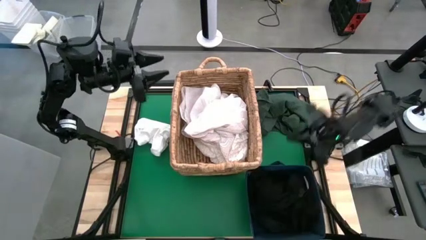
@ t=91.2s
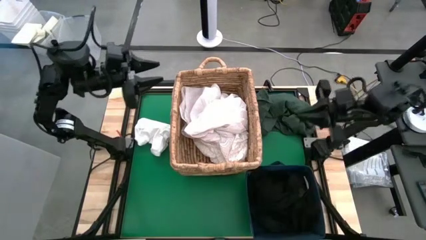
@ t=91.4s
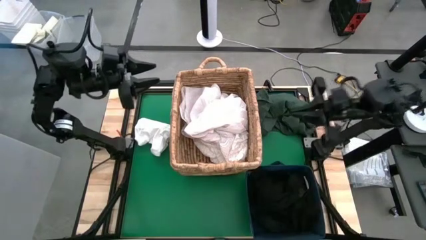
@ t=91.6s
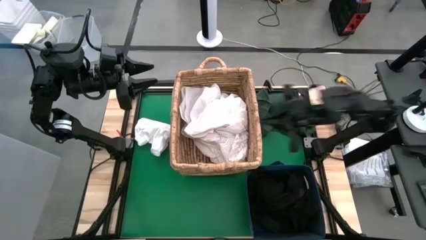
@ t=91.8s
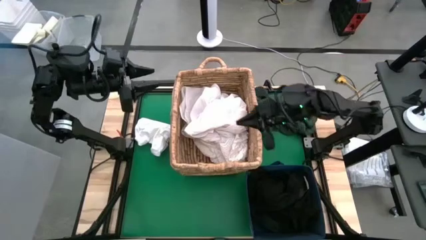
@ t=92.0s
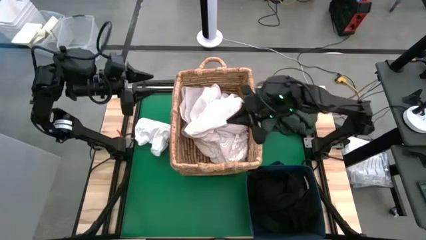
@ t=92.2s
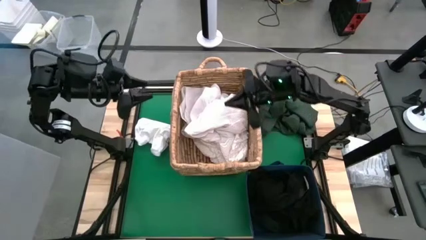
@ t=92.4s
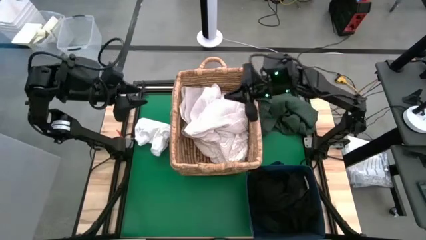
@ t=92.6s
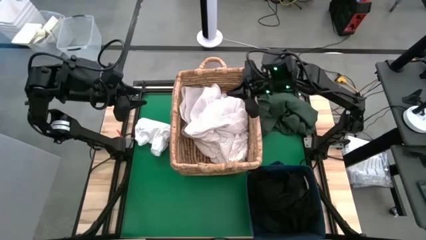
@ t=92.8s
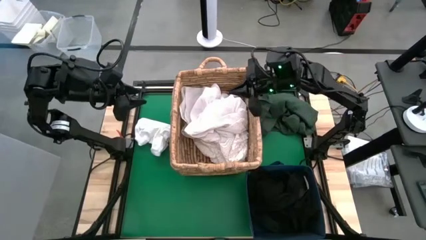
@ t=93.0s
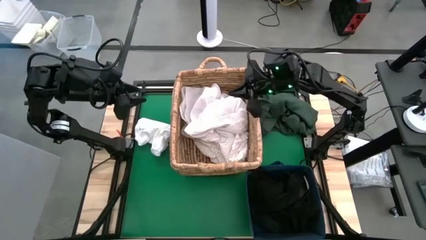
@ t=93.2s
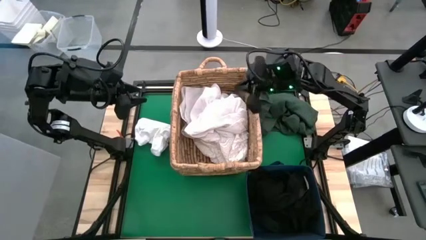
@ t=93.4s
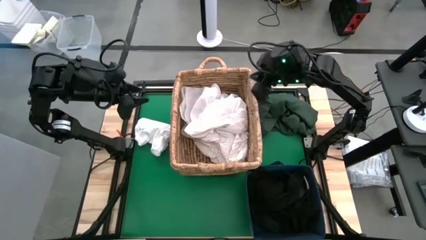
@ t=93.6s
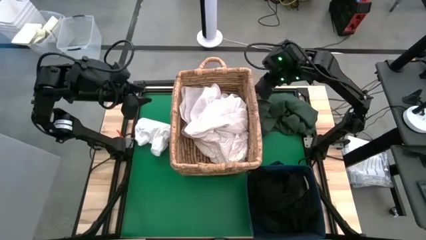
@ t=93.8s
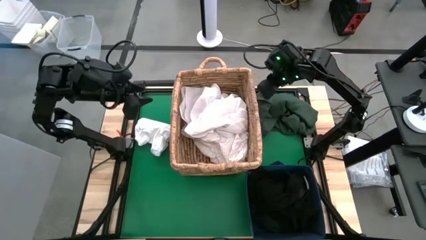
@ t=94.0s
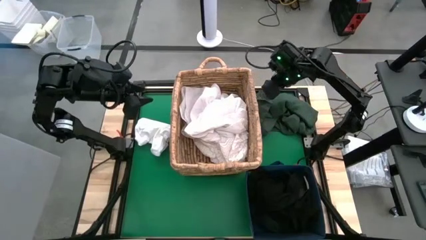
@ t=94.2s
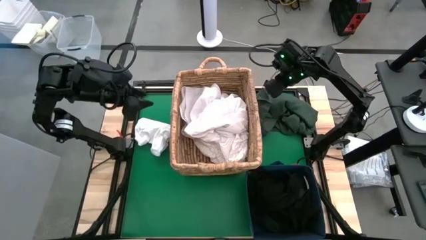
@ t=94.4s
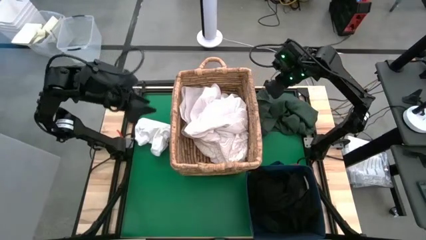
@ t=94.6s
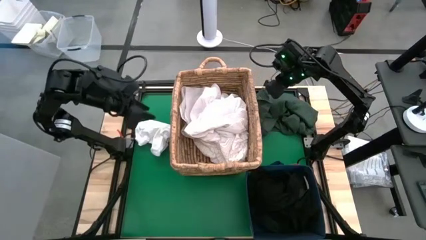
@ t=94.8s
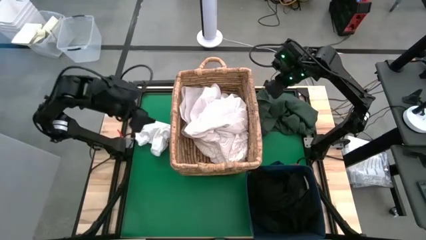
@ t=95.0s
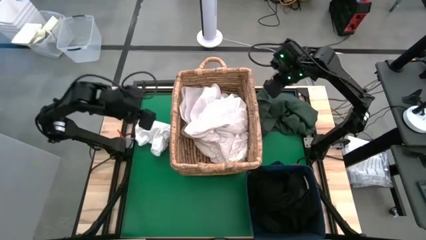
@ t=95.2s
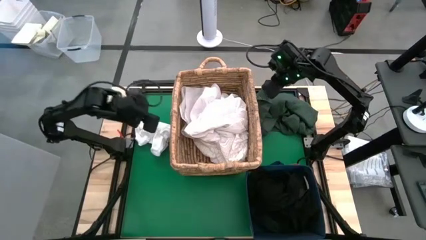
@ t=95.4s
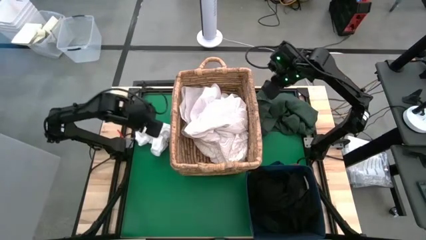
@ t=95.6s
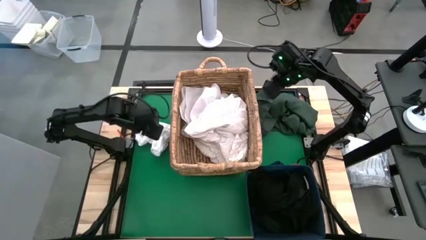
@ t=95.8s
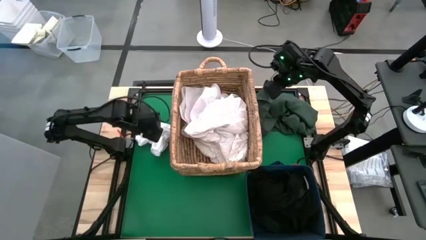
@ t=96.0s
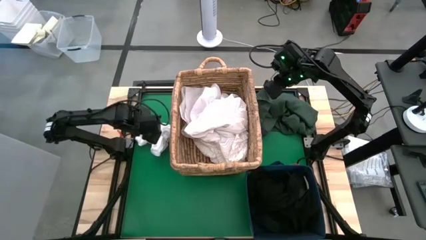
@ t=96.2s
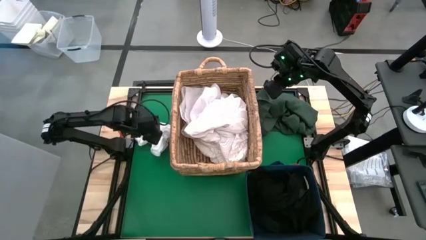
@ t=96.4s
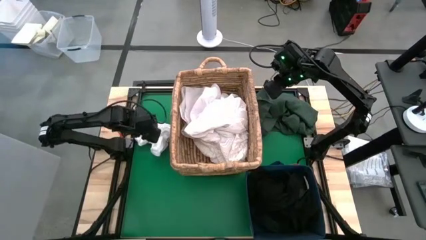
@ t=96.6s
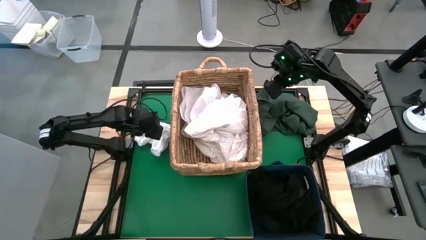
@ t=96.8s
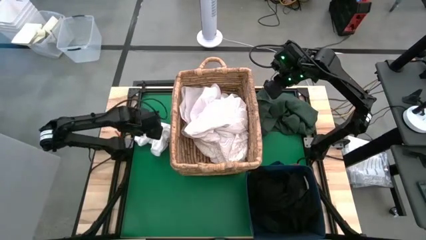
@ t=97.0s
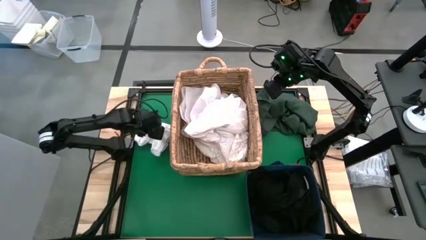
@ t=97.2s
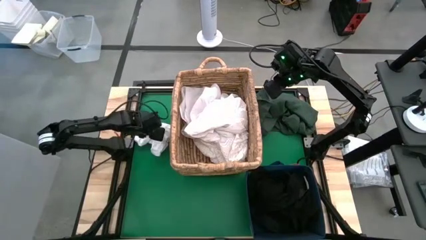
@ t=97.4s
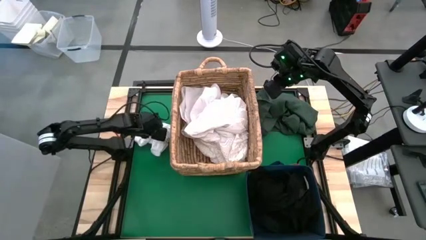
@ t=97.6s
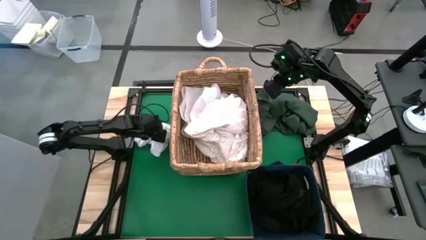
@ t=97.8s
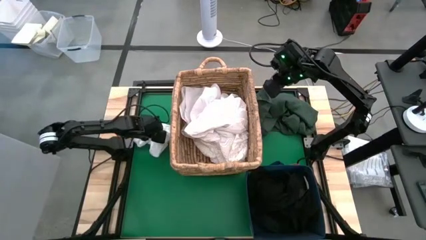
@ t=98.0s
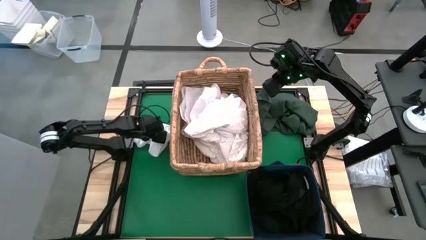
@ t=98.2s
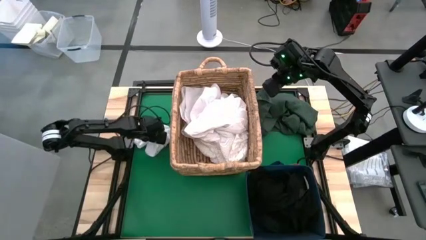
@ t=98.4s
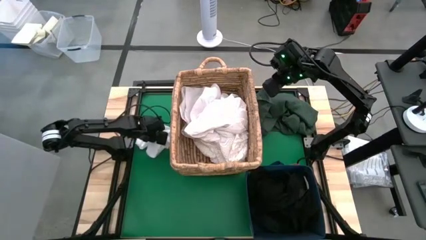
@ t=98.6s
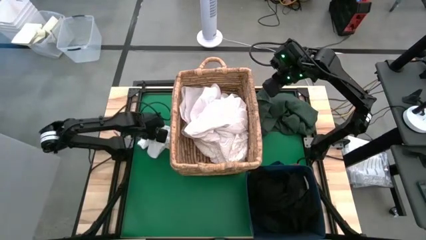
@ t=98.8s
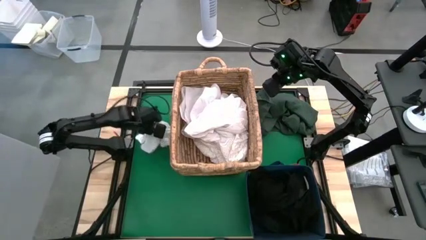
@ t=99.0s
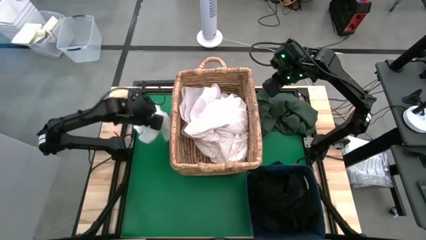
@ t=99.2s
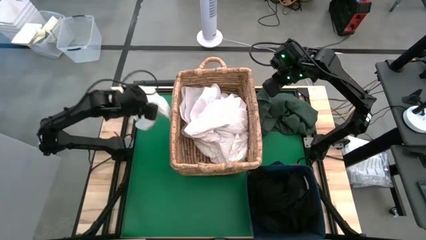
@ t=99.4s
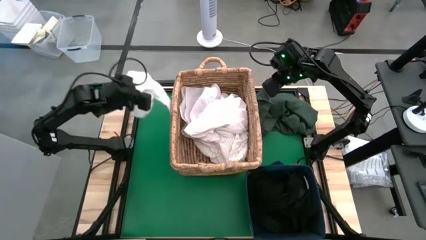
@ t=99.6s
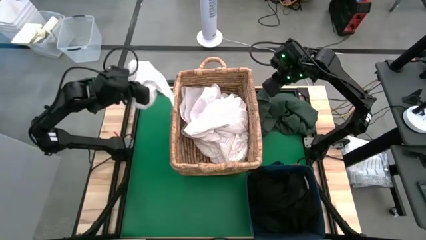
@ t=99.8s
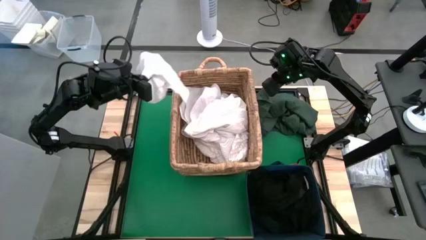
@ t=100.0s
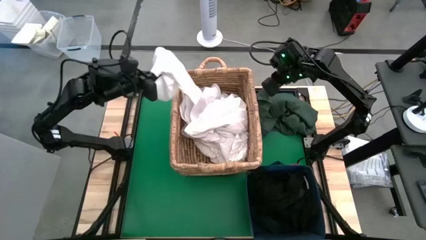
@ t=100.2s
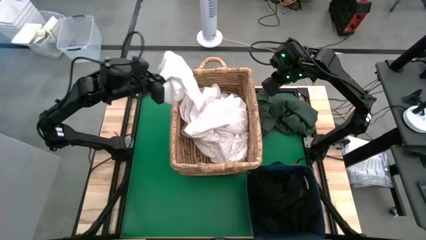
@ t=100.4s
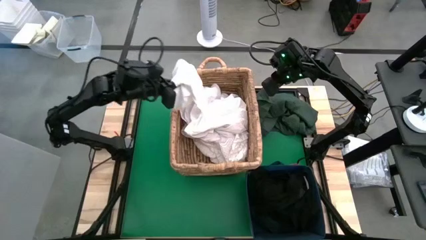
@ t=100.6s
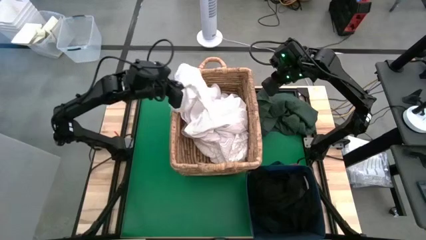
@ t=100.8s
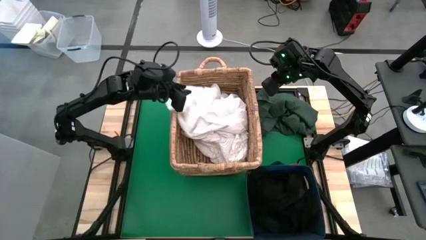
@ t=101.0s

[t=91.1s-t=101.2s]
Put the white pants into the basket

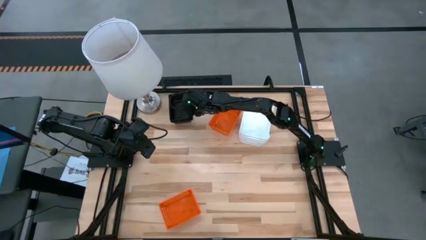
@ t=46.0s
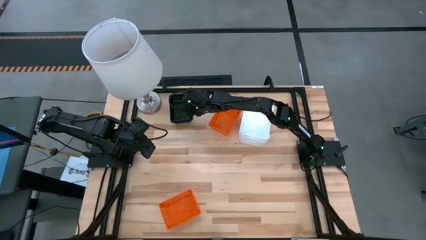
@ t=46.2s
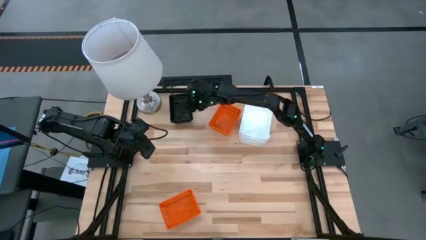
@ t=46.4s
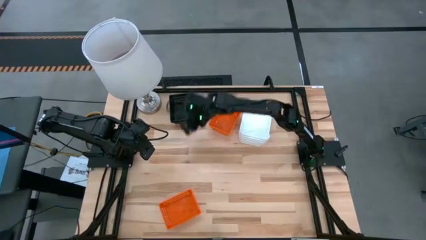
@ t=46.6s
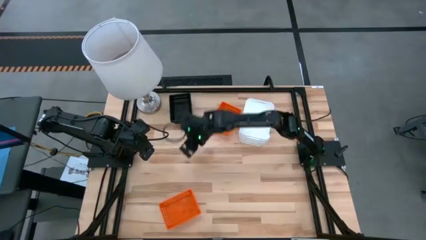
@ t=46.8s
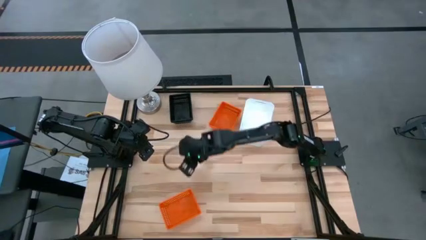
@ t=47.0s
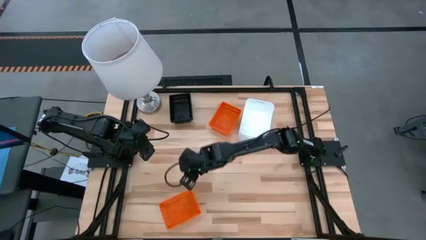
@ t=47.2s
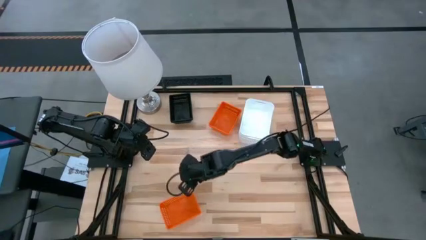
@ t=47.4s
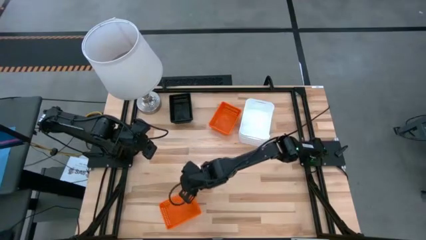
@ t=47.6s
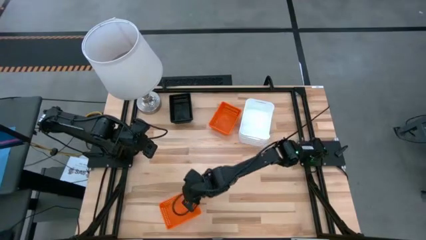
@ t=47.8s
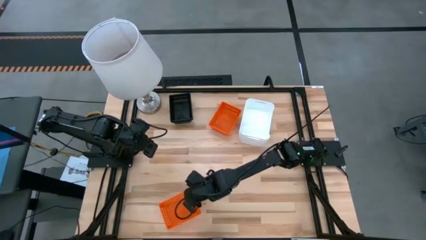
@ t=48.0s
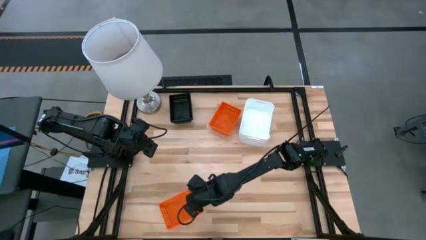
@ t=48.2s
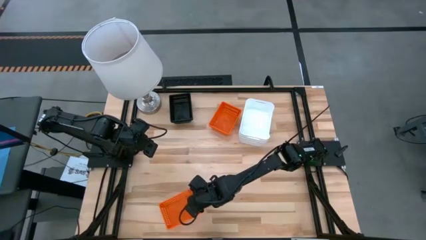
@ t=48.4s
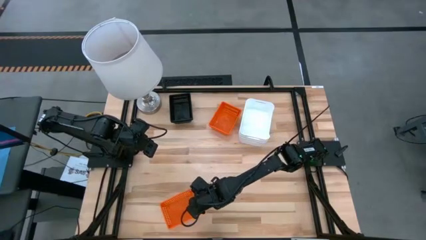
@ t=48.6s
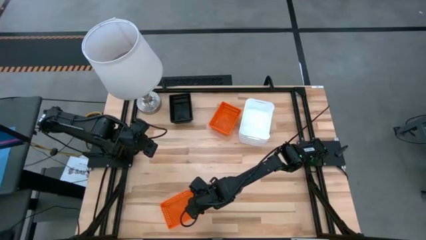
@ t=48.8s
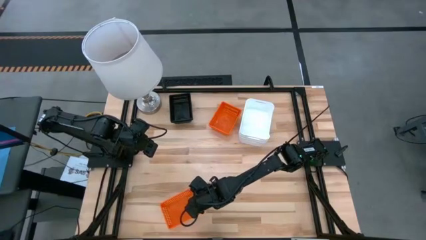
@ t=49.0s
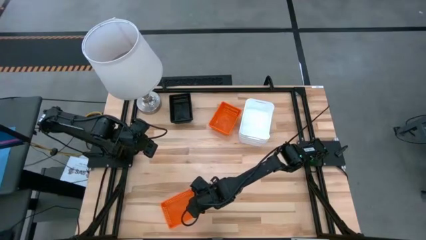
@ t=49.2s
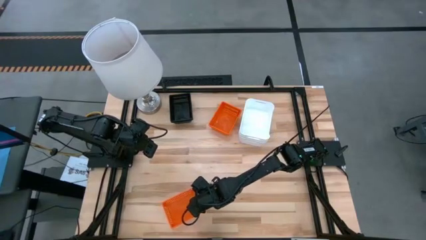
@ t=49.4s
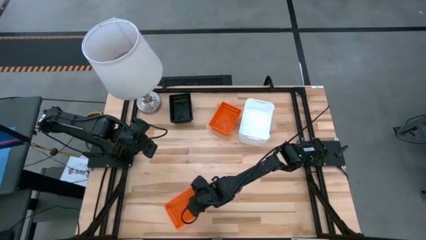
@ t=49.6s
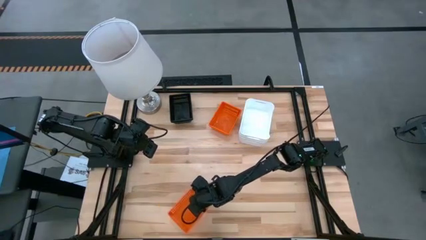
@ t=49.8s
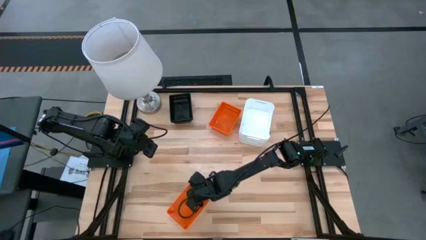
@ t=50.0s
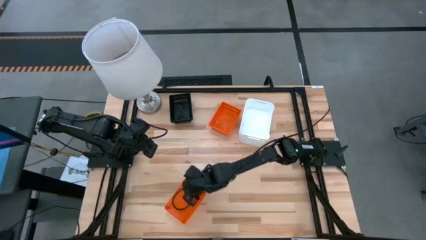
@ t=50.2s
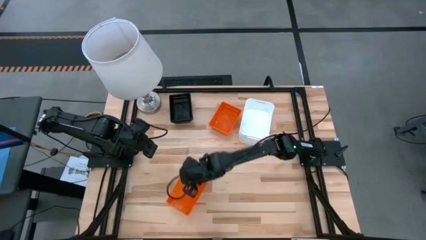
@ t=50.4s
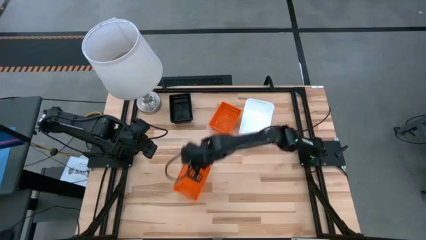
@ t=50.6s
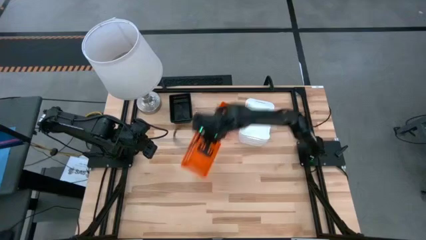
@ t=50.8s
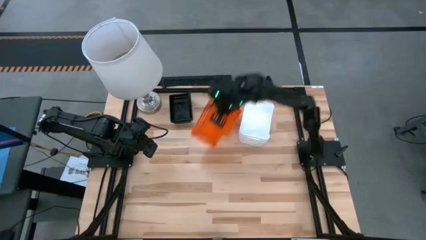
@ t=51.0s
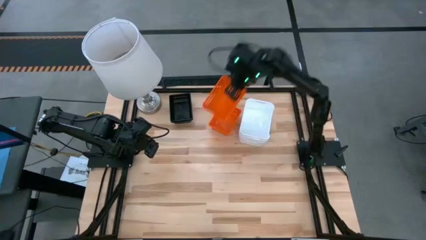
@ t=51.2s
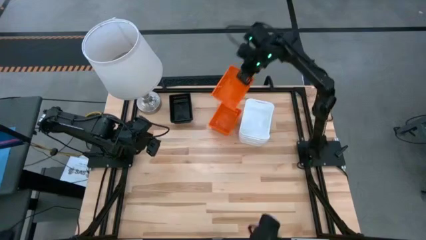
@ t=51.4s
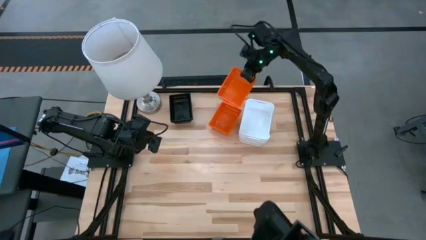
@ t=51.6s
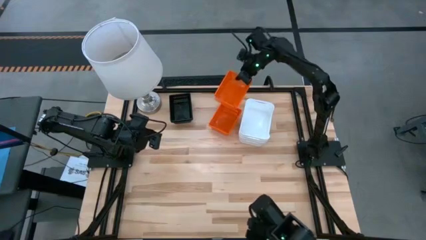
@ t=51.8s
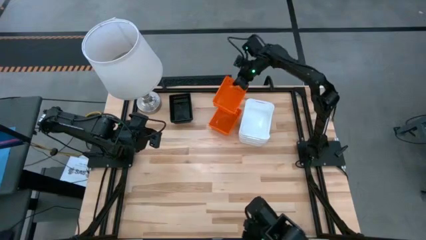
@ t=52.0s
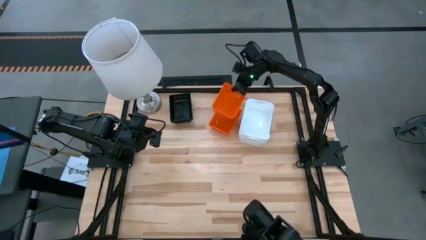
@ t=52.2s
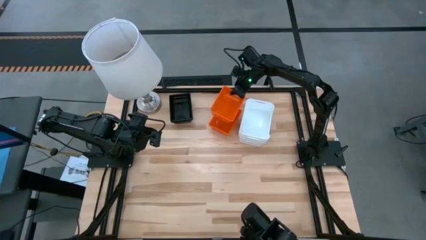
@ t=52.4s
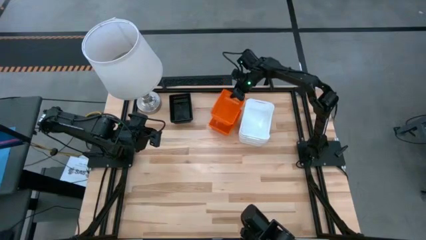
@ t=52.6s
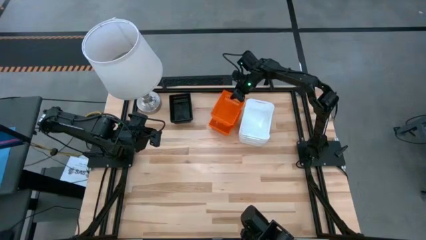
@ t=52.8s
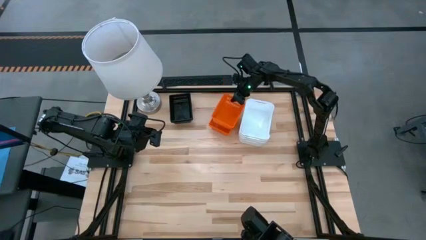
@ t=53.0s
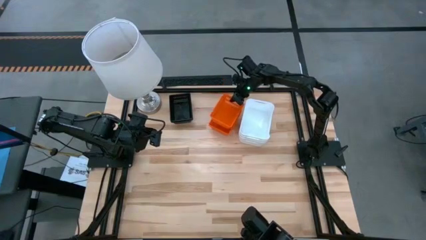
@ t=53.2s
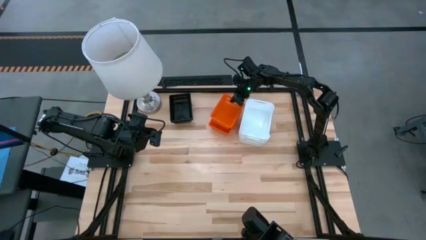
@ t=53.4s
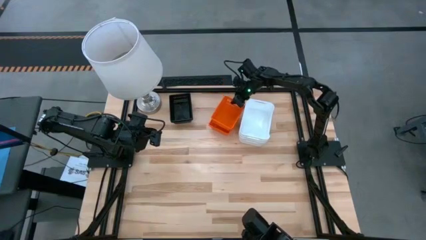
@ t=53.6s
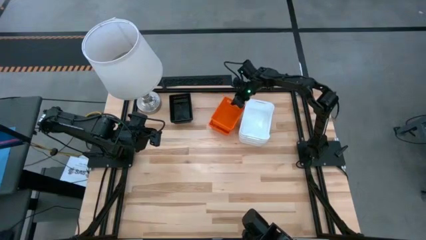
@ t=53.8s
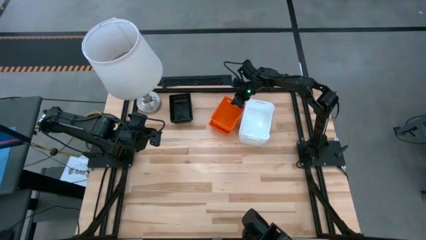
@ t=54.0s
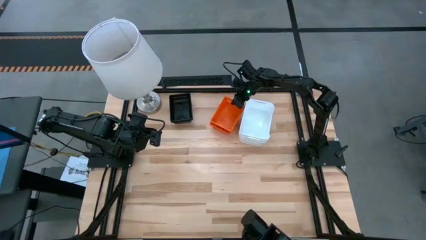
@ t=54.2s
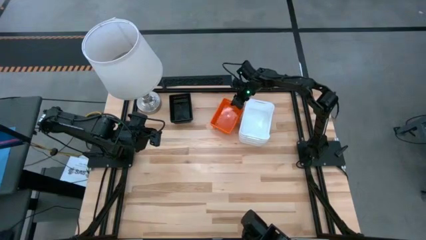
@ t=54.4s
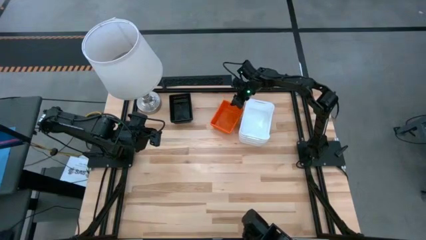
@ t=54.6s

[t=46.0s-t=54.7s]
Stack the orange basket on top of the stacked orange bin
